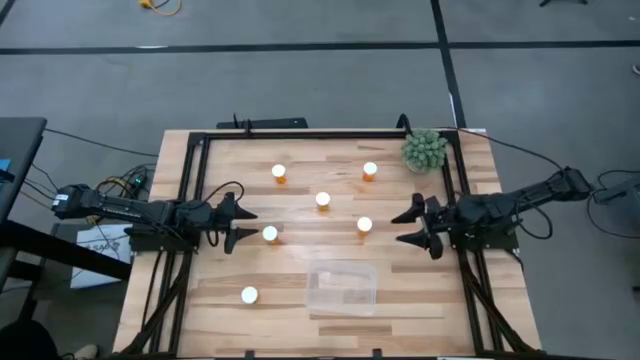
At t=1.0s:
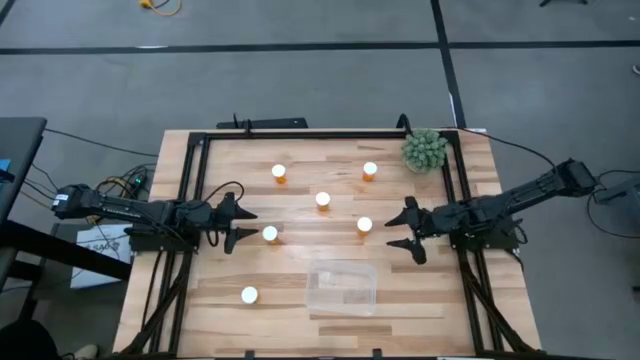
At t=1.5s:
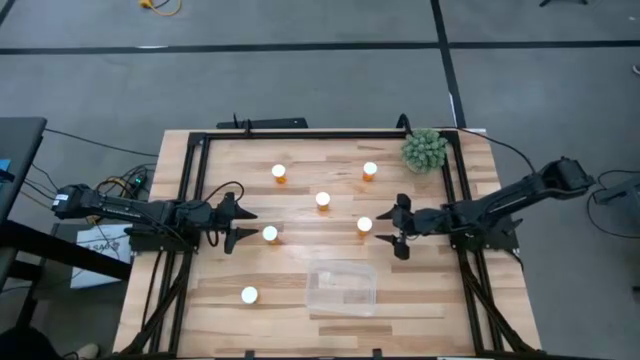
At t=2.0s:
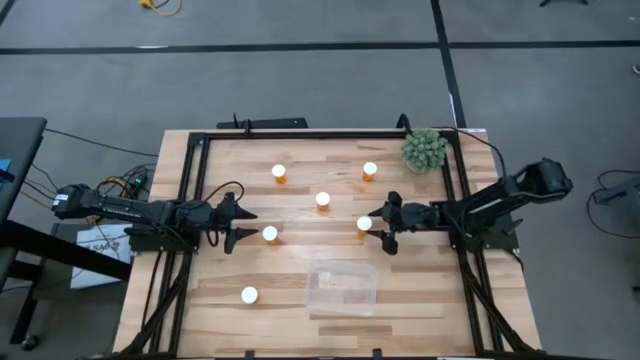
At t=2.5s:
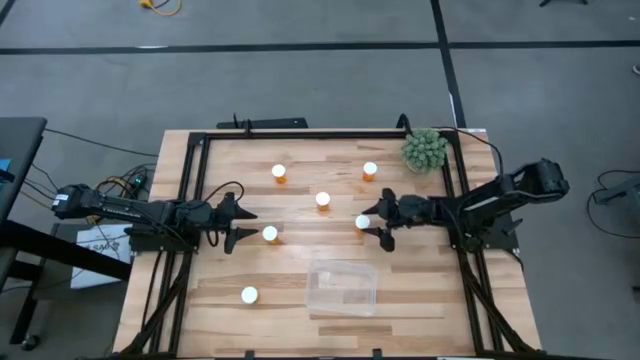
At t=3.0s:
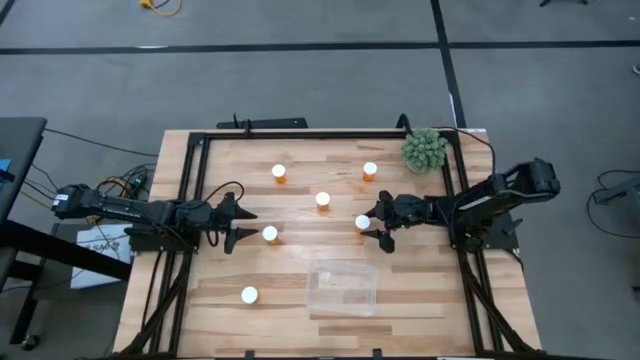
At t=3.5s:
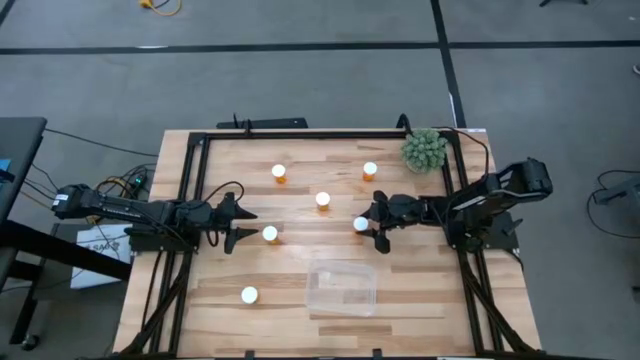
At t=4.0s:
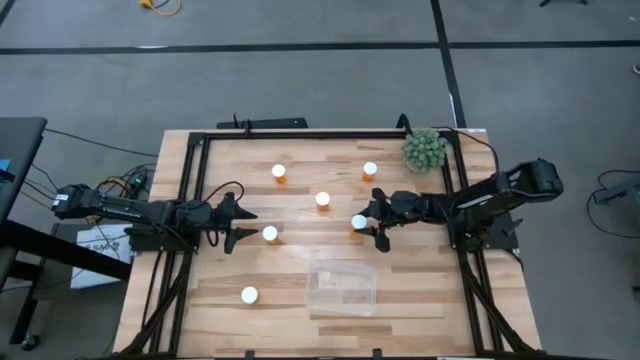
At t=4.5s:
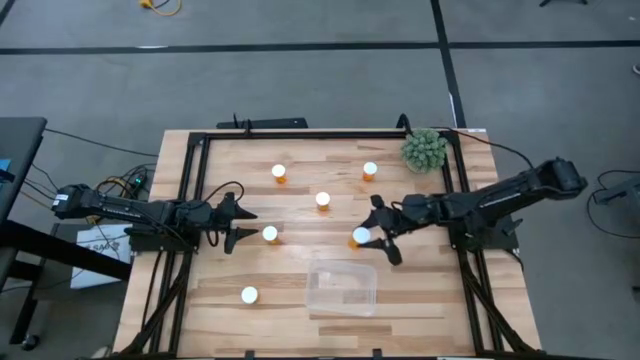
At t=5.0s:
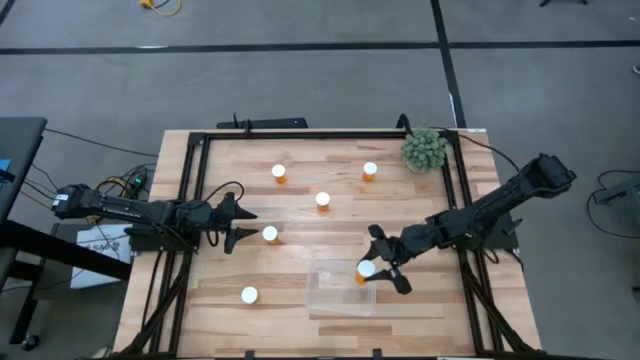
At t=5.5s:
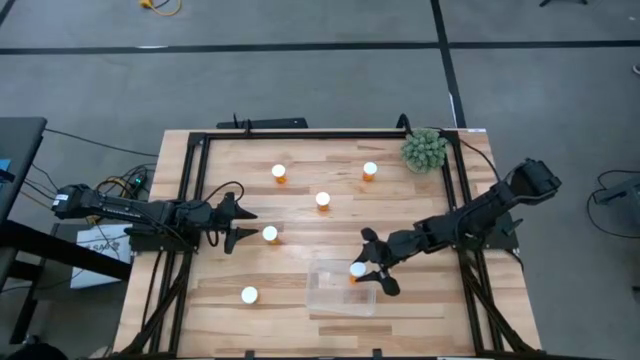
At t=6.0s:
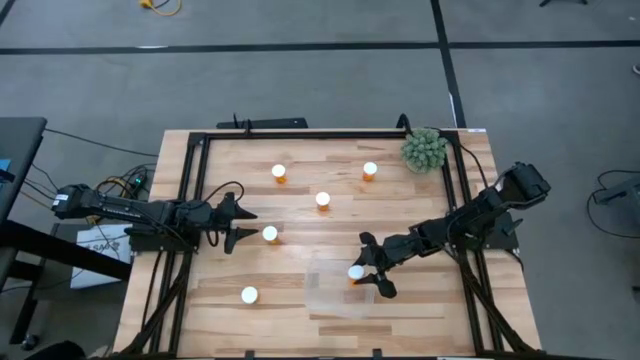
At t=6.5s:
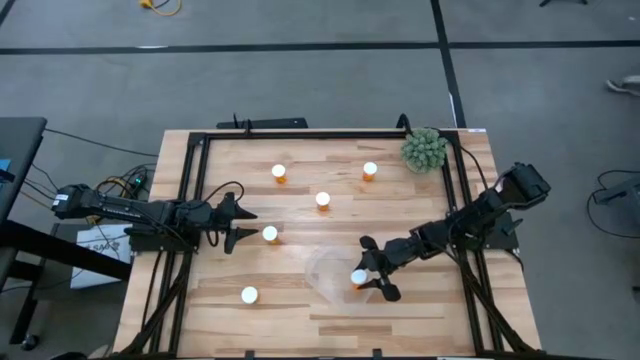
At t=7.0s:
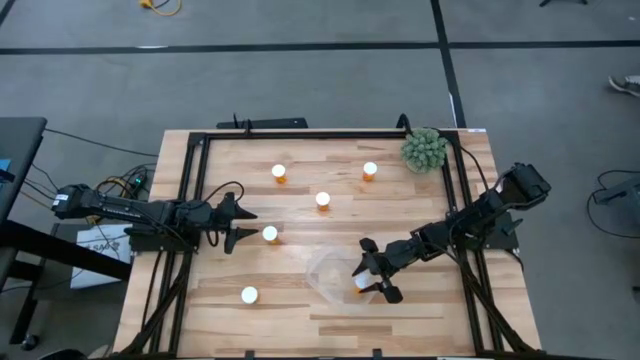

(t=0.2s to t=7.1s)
Task: Pick and place pill bottles into a basket
Put the orange pill bottle into the transparent container

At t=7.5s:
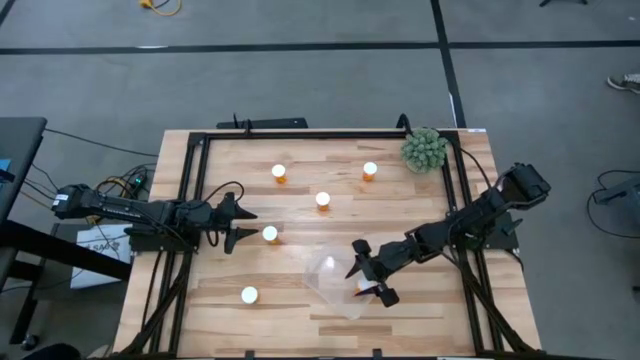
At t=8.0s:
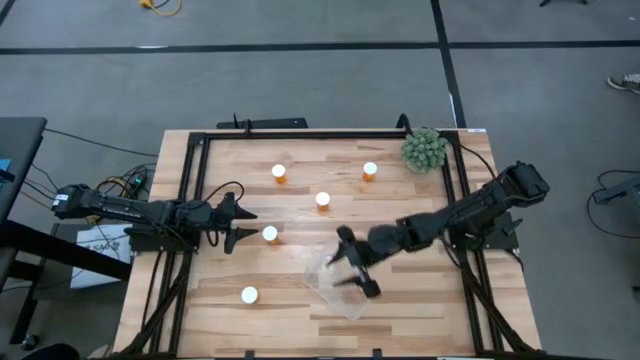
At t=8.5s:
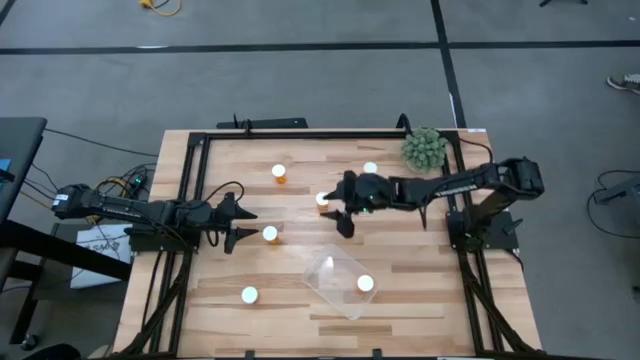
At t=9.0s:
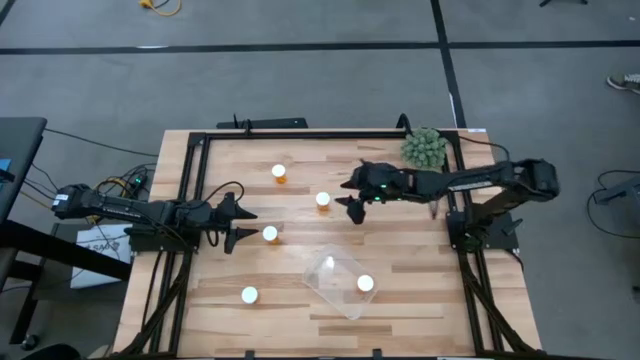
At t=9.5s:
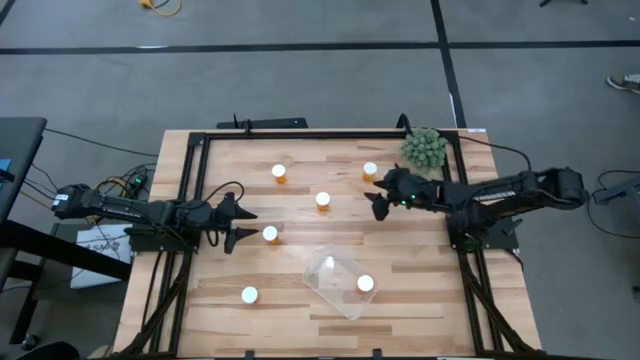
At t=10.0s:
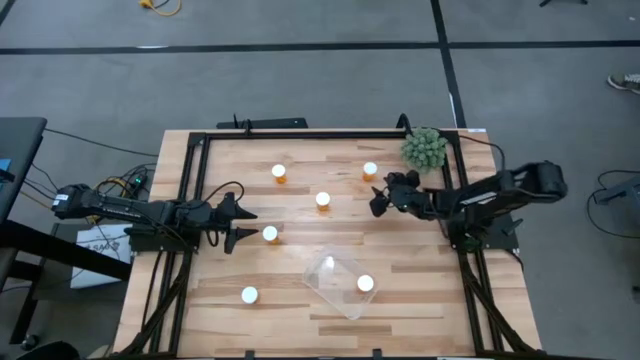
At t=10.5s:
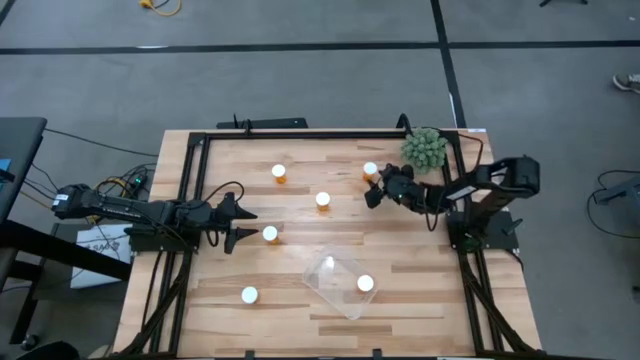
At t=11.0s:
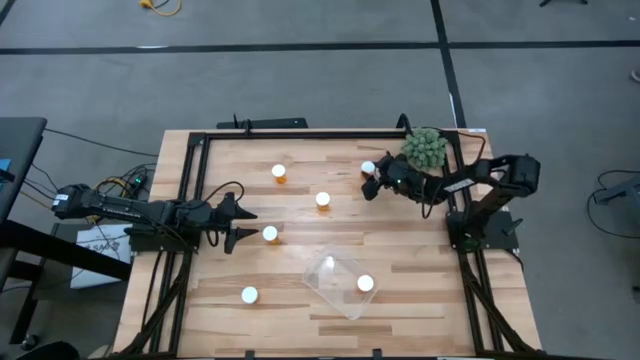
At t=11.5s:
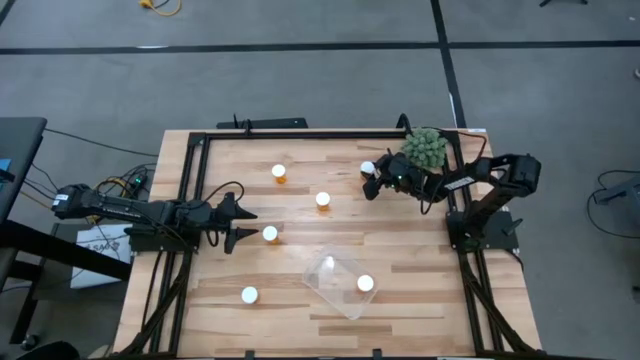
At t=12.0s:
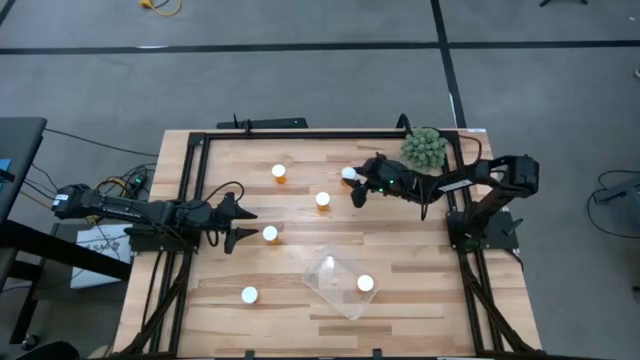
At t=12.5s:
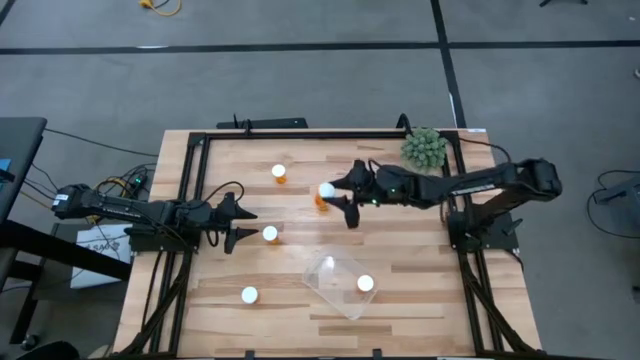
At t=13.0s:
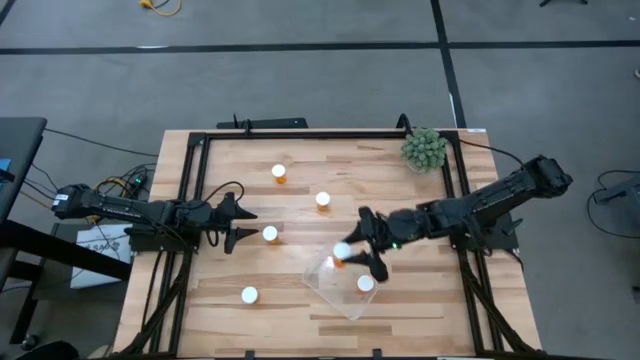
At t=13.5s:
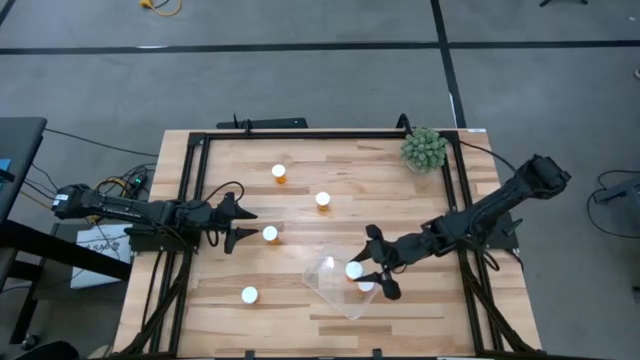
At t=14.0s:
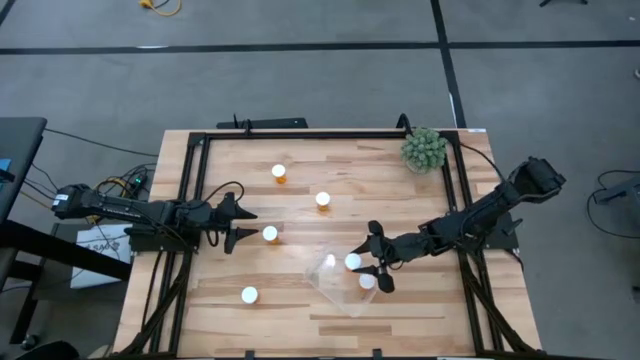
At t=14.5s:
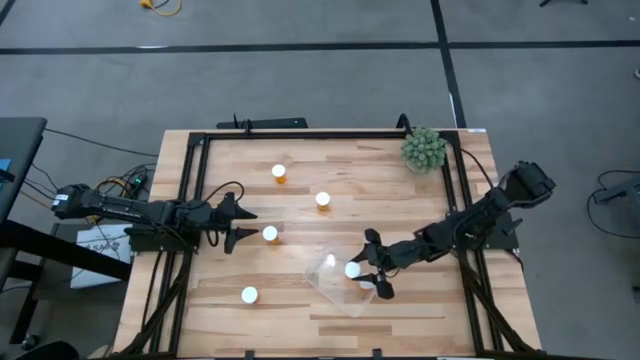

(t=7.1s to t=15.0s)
Put the orange pill bottle into the transparent container

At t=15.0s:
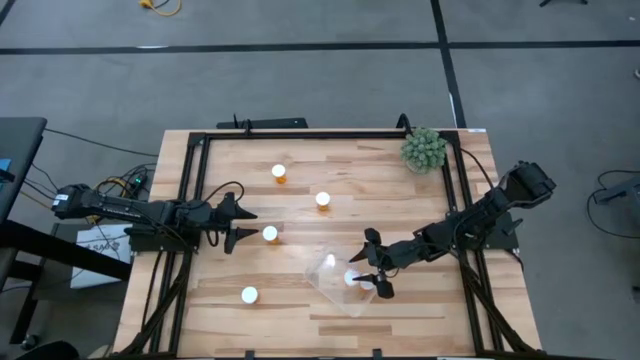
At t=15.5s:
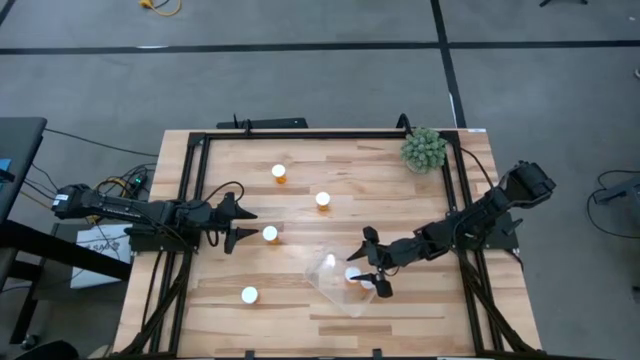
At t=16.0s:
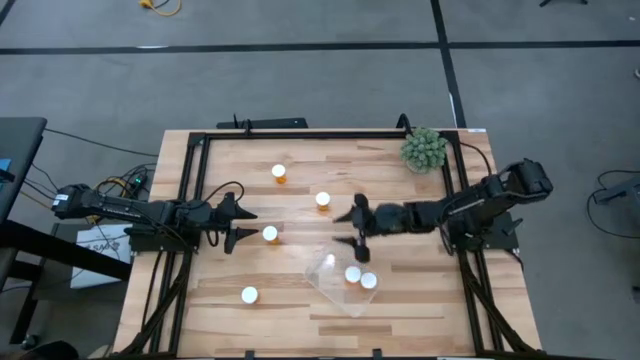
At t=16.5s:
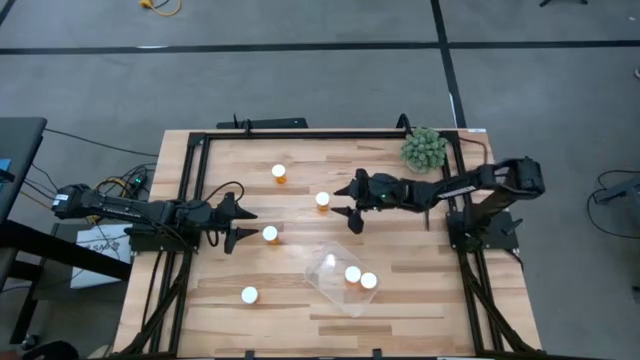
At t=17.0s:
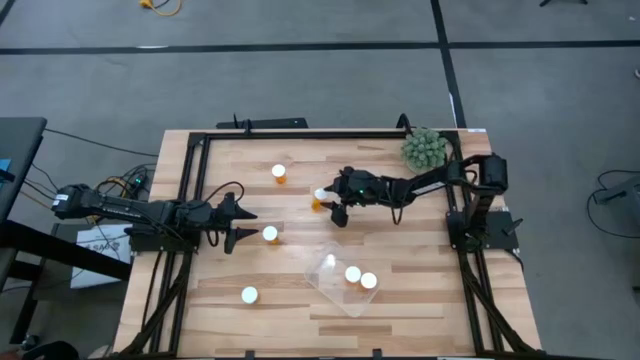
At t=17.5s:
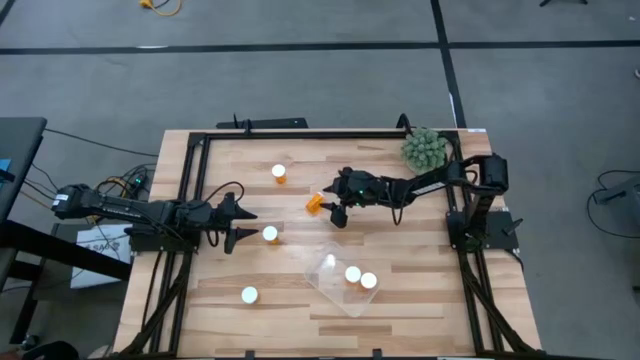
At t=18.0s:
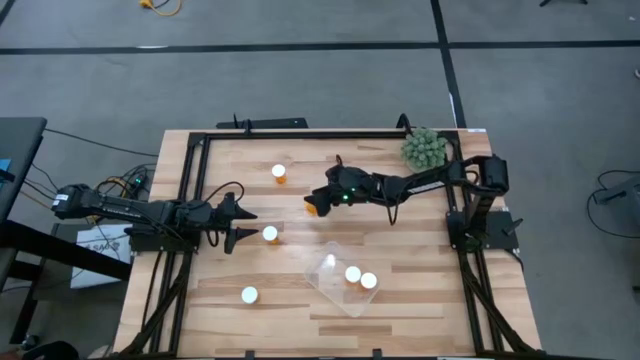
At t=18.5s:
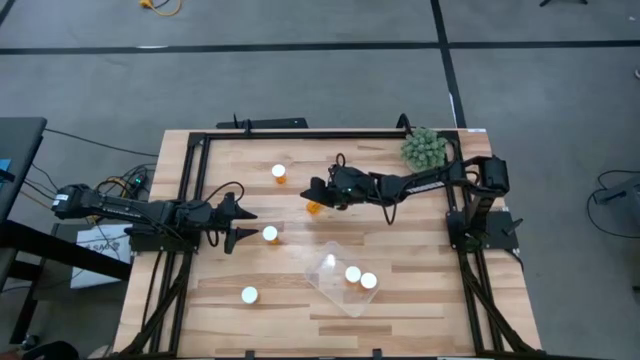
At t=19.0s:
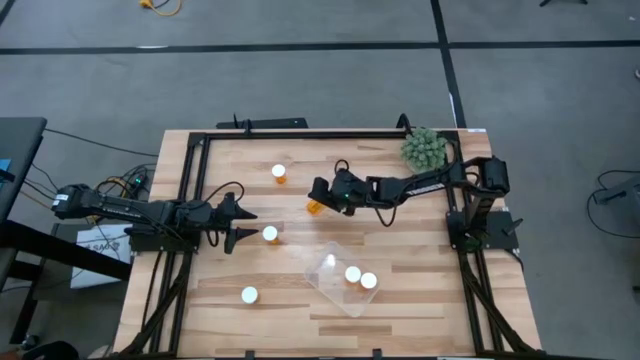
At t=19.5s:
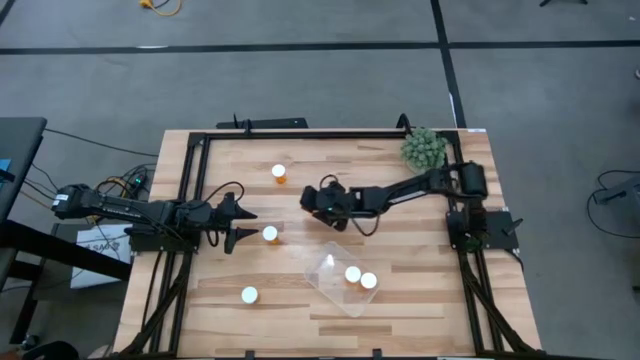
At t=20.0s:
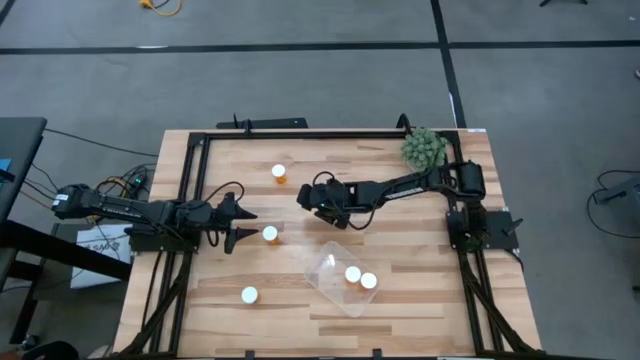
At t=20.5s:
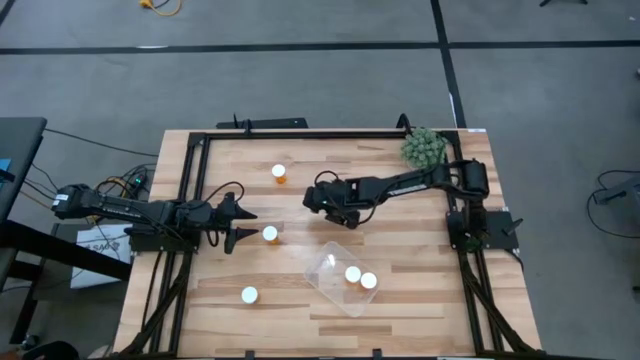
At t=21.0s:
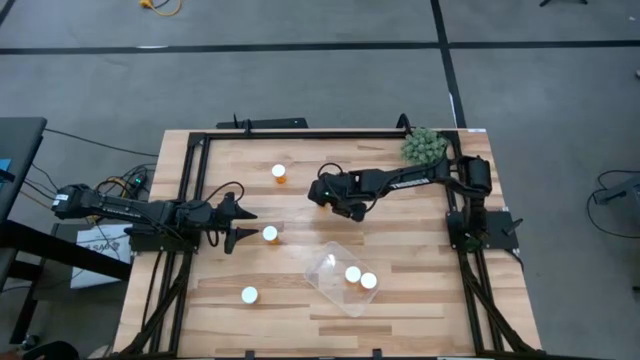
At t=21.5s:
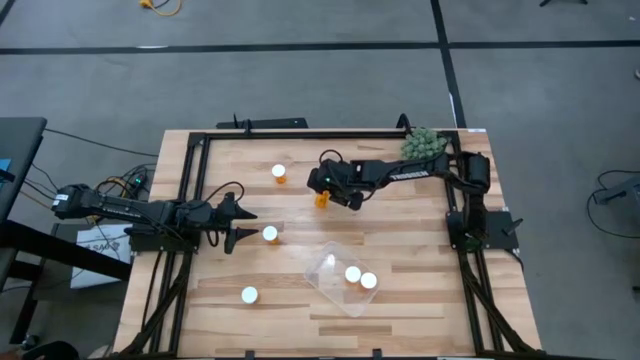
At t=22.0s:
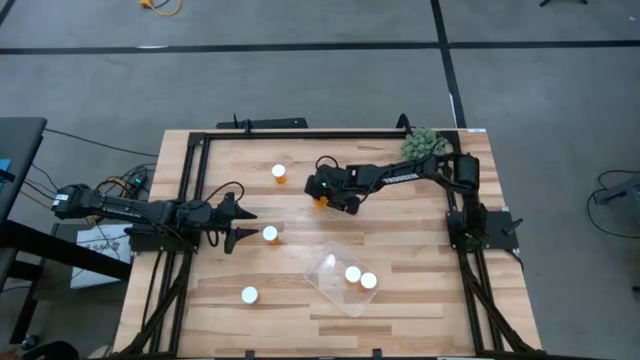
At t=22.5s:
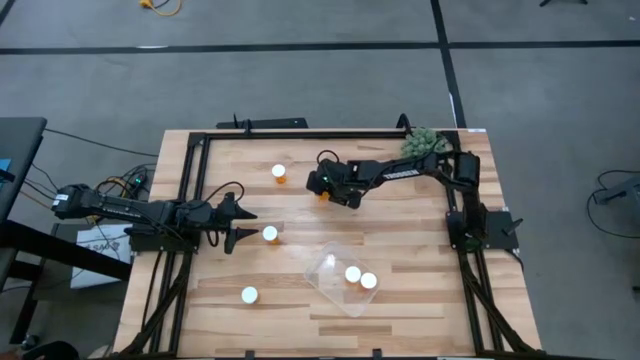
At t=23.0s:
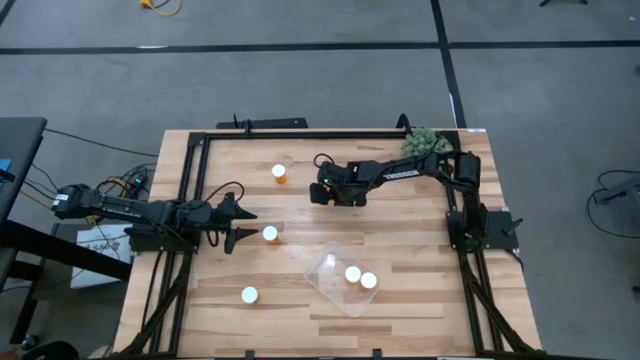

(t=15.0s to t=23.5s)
Put the orange pill bottle into the transparent container
